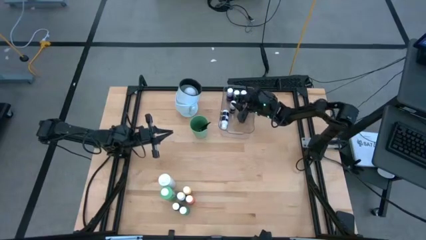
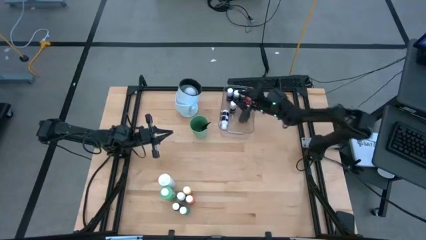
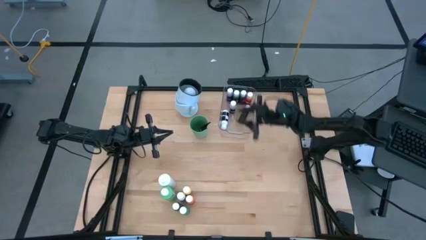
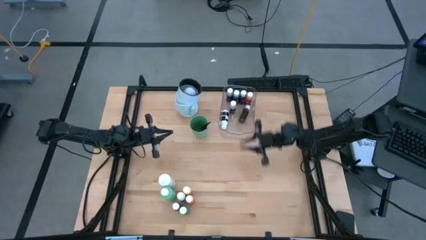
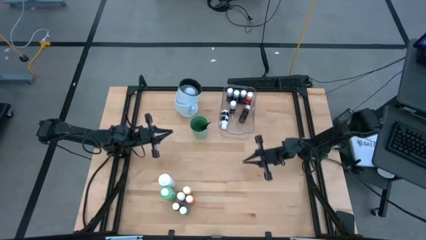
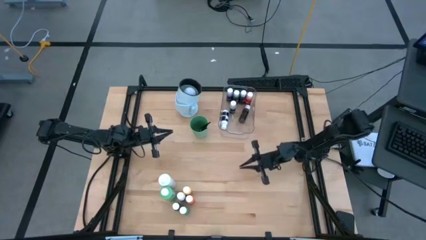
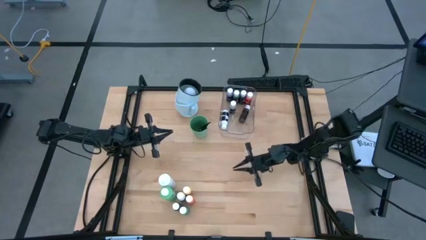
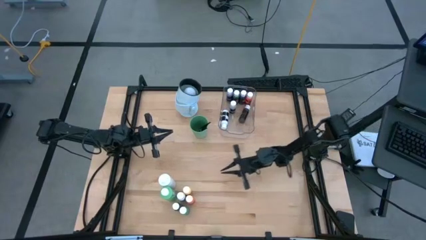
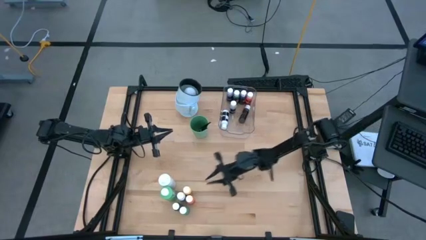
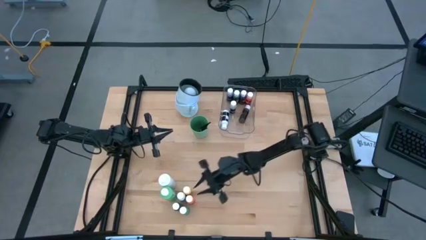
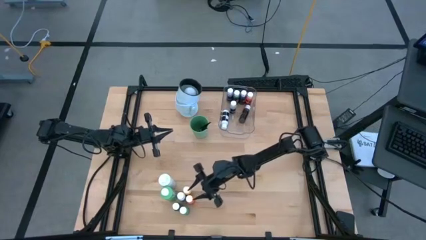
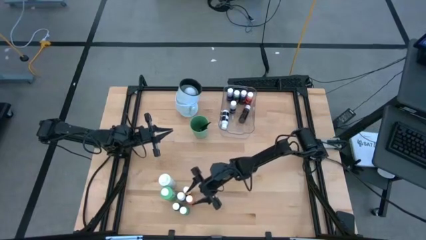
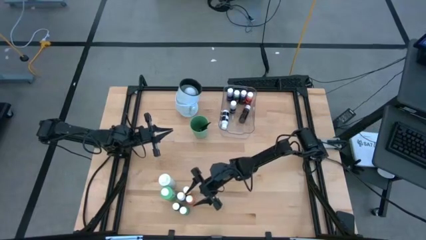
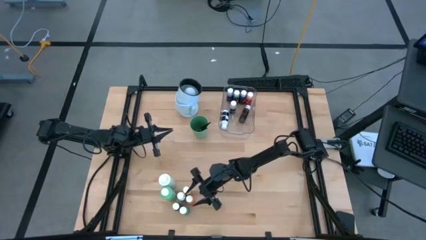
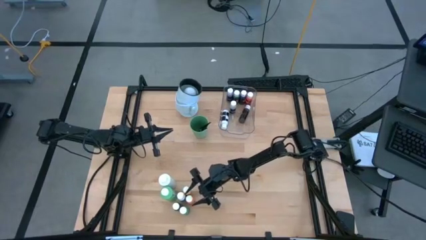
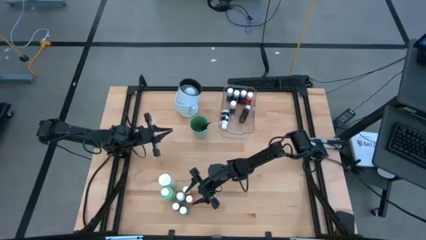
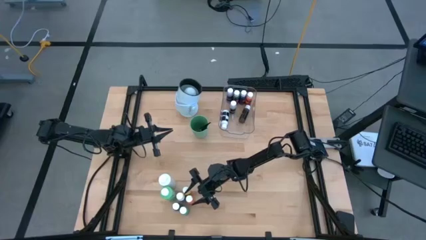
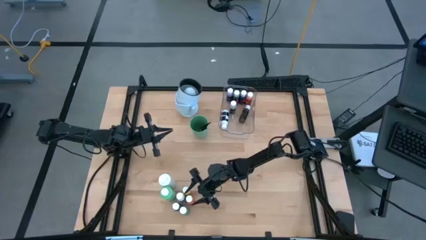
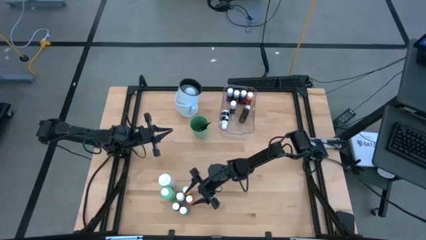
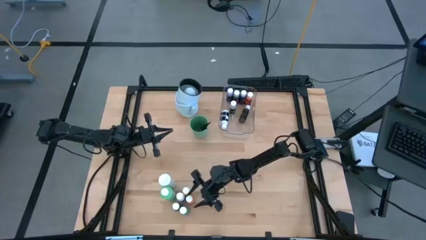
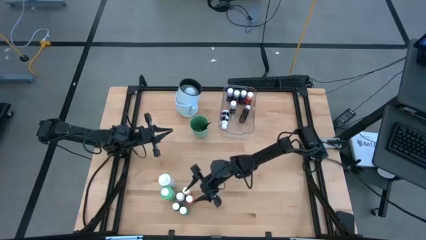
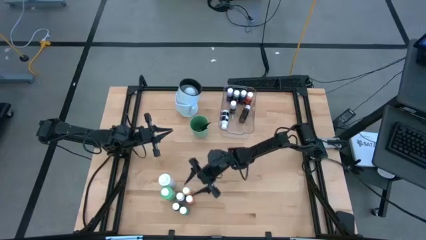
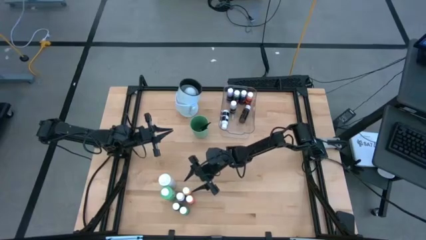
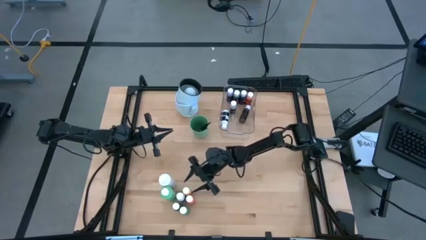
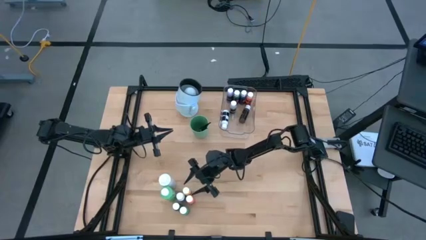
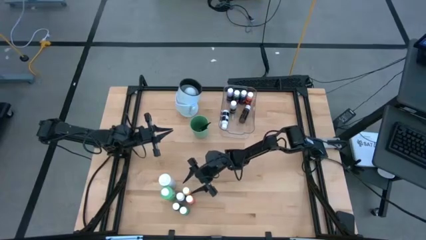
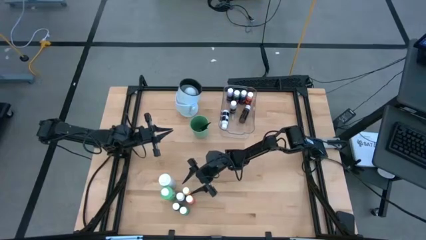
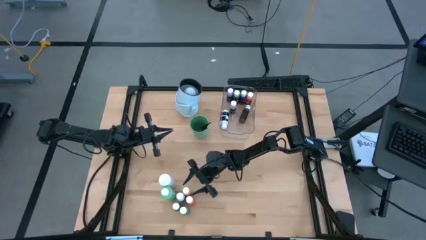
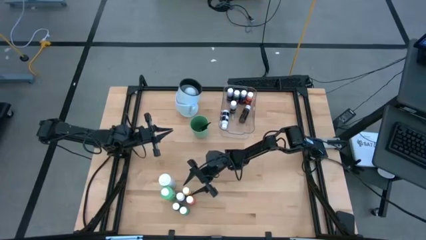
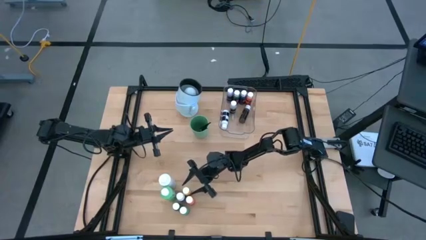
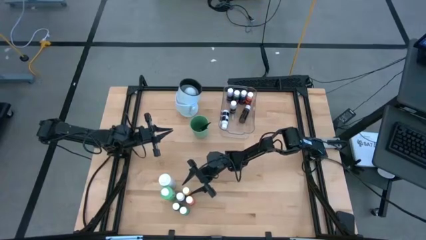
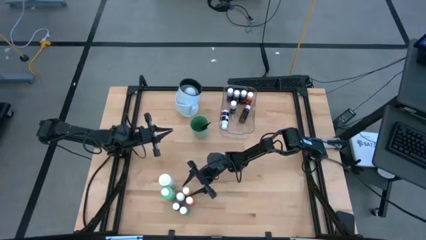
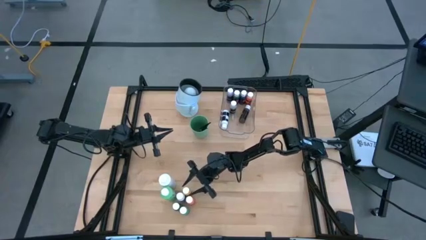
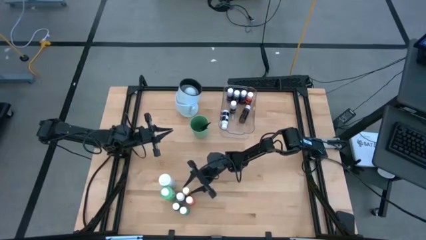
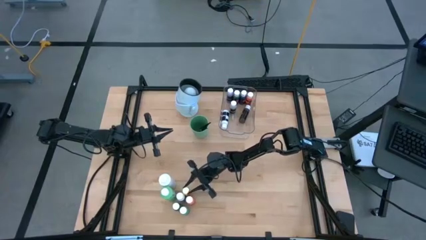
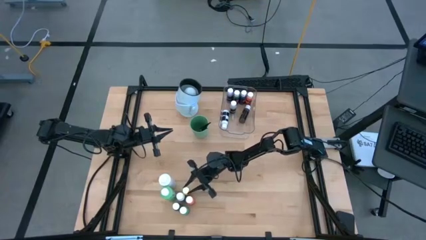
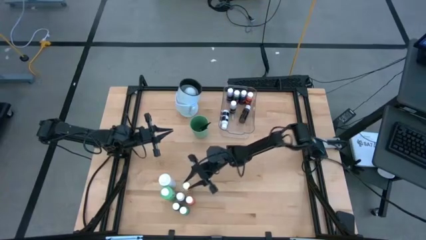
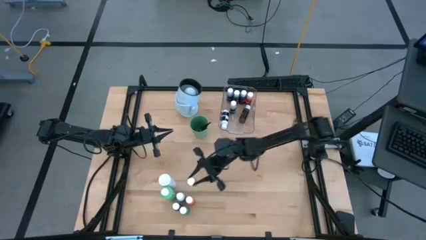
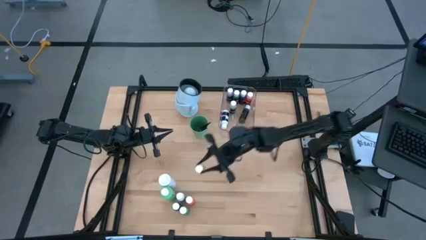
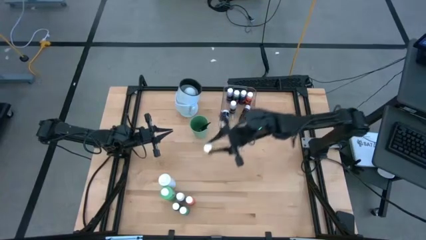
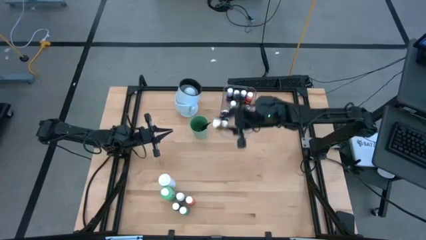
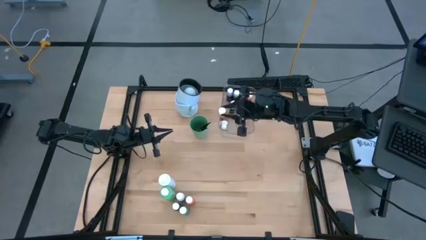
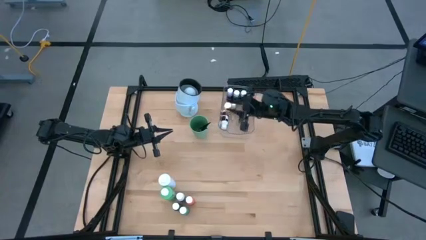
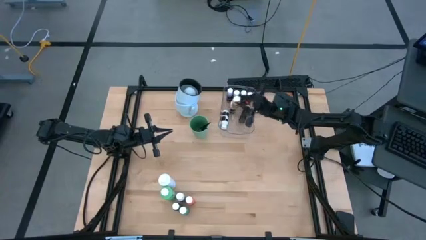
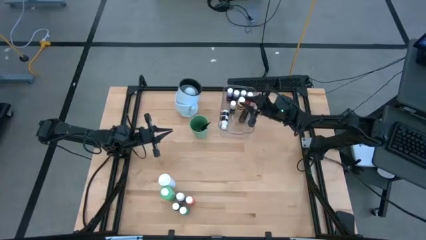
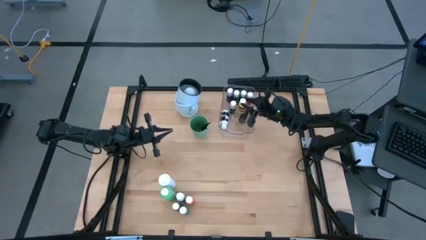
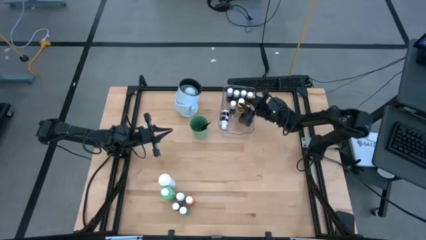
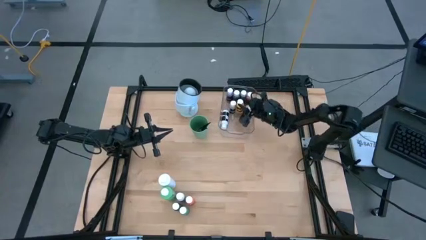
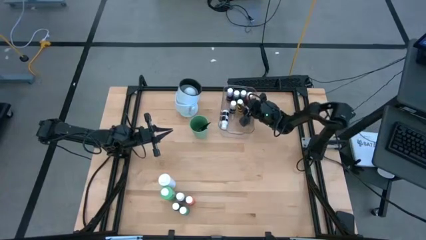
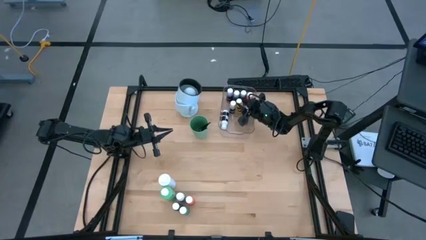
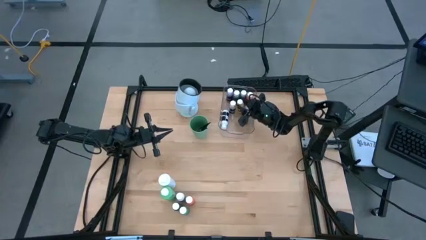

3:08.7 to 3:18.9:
Task: Pick & Place Paint Supplies
Put the yellow paint bottle into the transparent bin

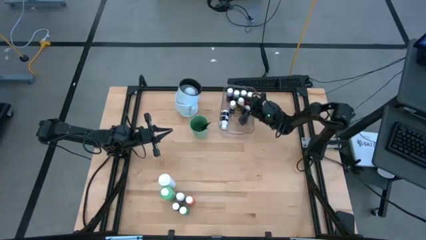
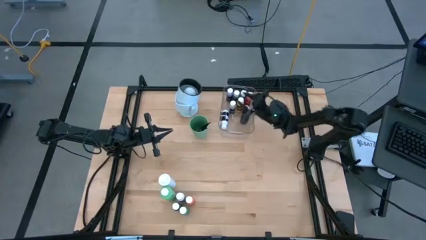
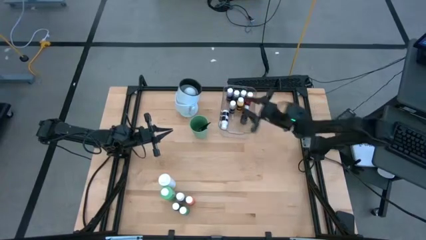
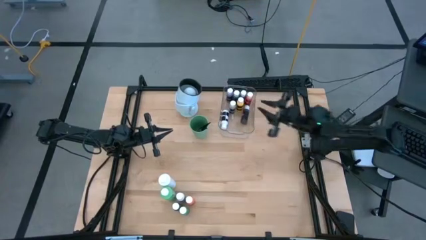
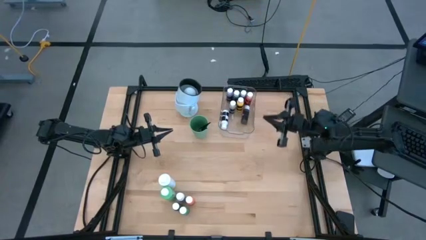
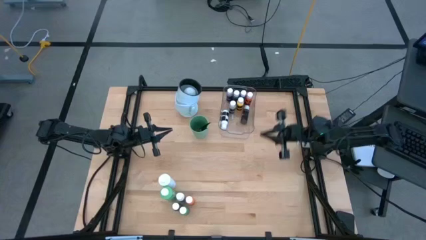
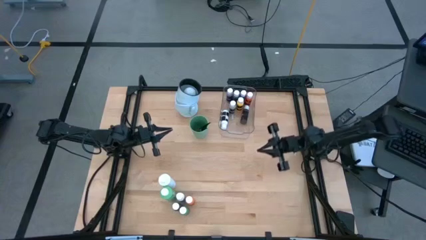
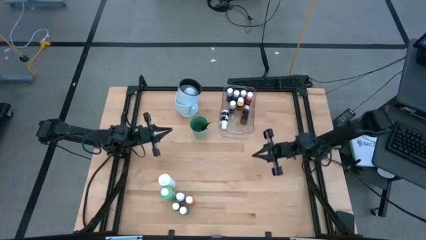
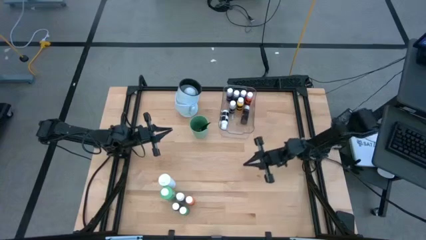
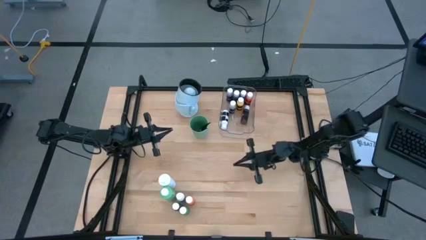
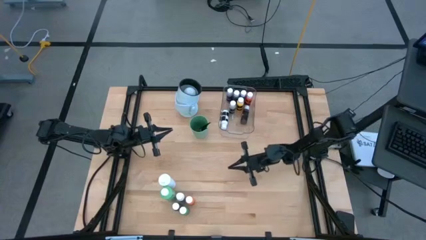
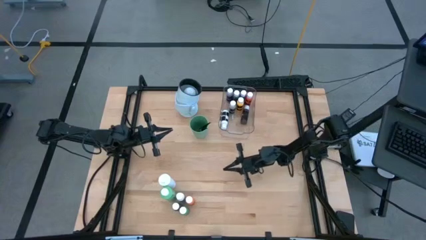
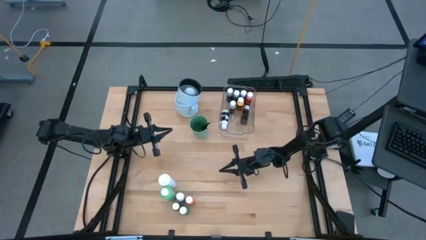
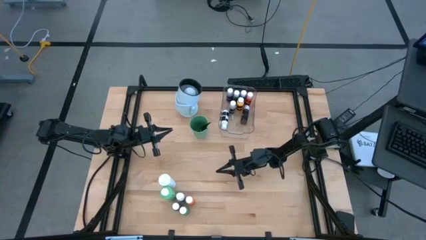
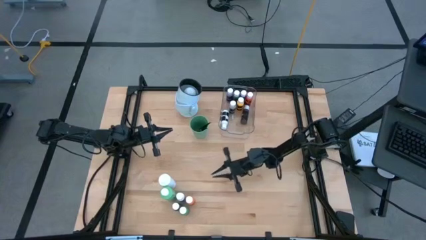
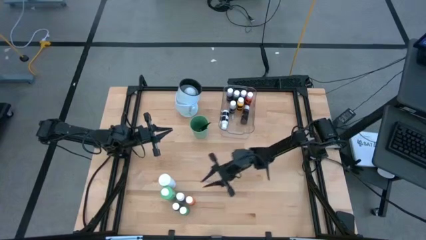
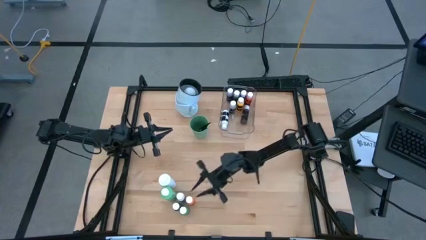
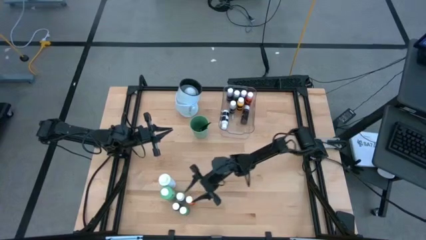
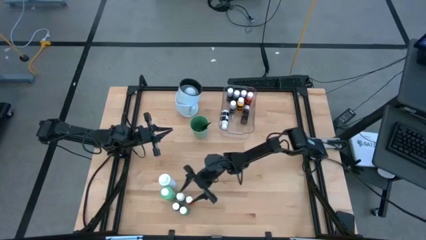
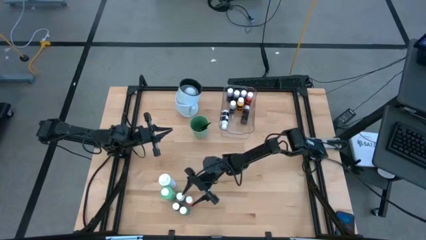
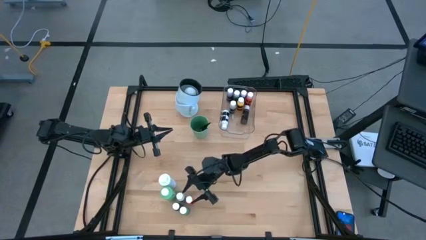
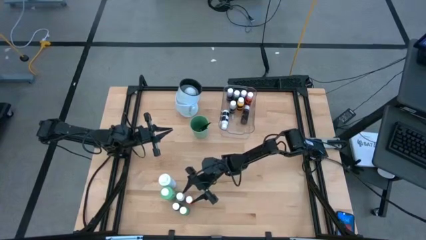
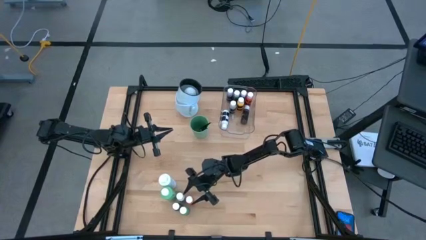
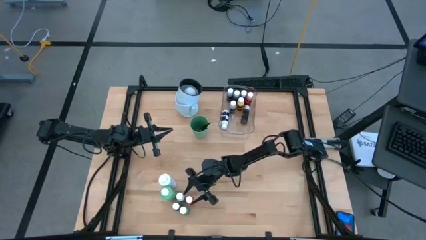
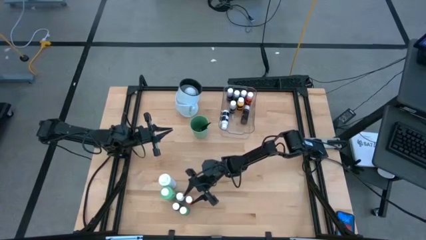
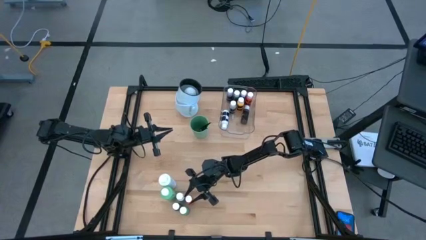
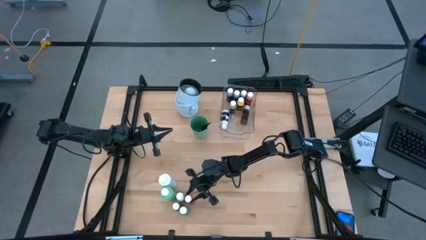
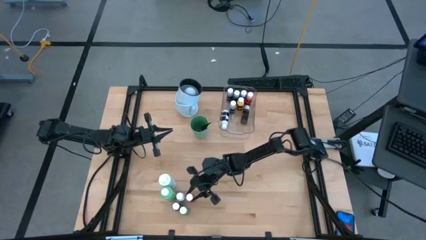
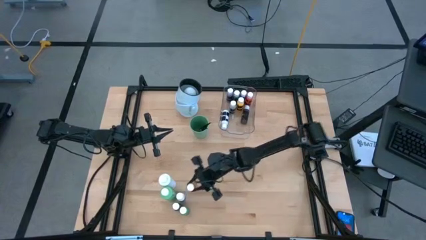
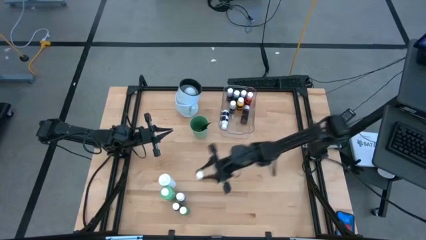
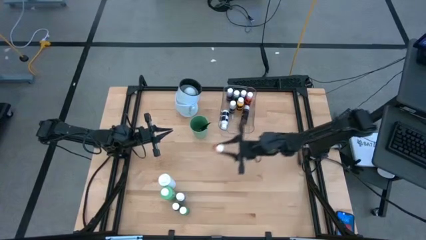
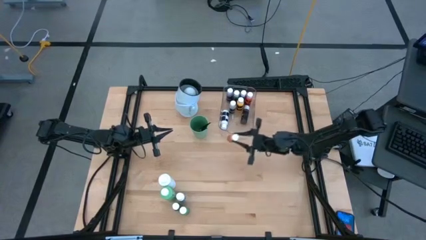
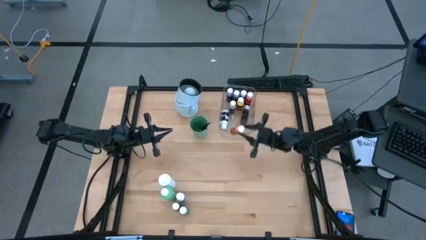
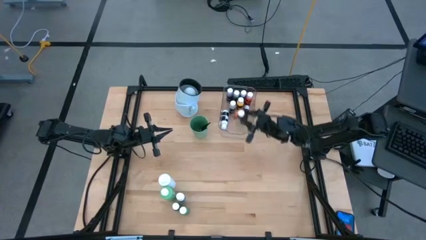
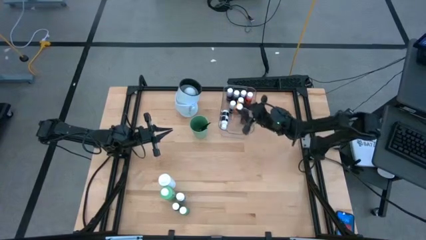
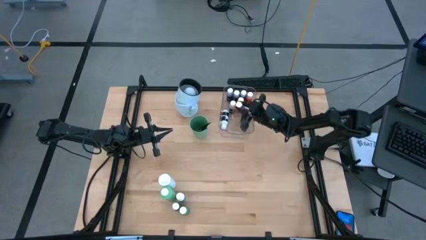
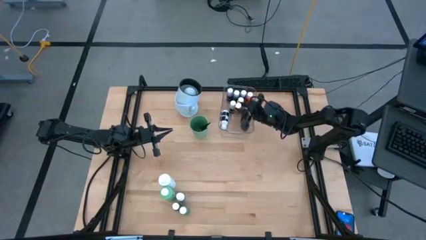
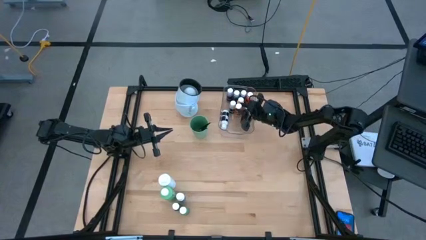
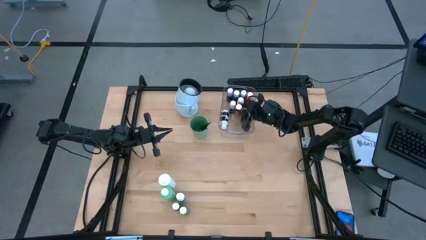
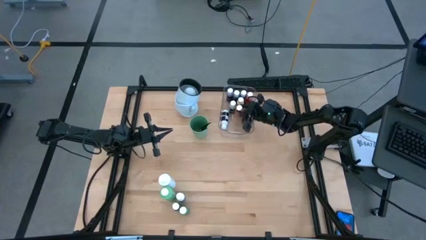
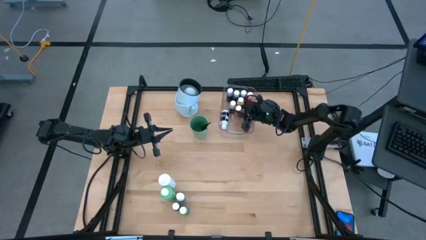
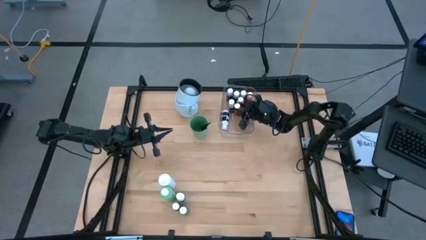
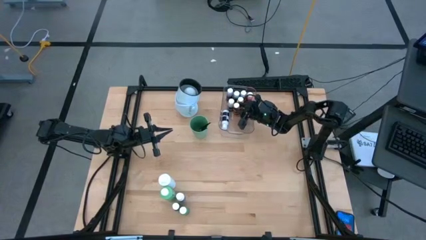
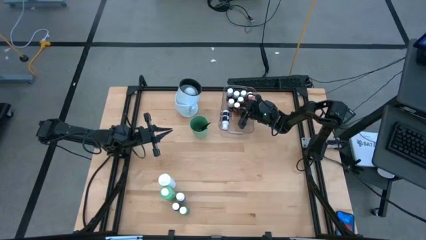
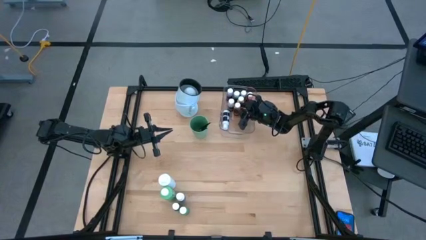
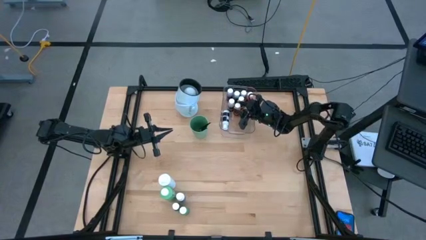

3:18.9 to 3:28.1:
Put the orange paint bottle into the transparent bin
